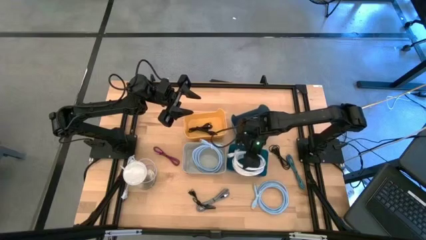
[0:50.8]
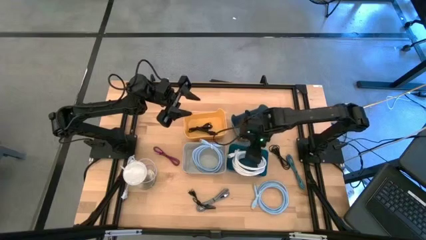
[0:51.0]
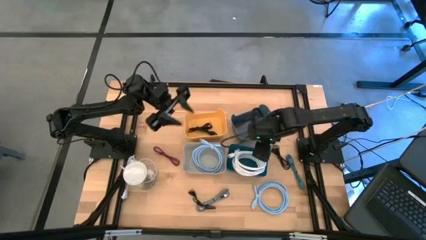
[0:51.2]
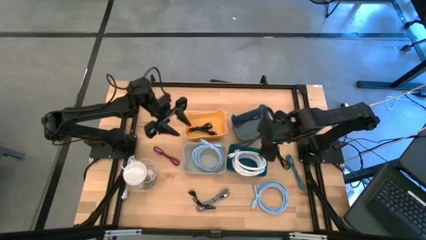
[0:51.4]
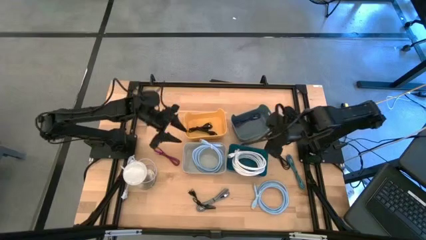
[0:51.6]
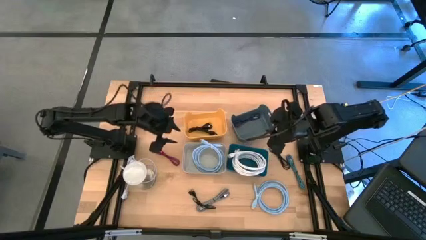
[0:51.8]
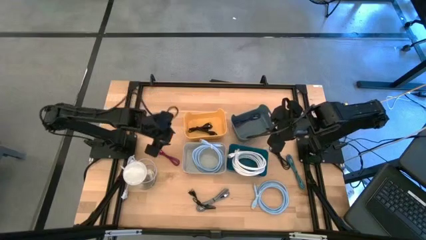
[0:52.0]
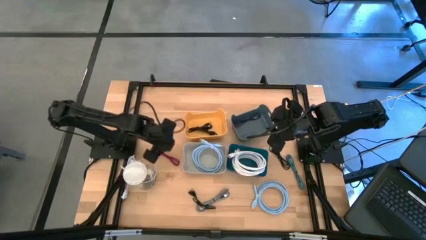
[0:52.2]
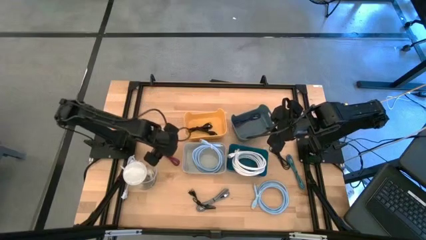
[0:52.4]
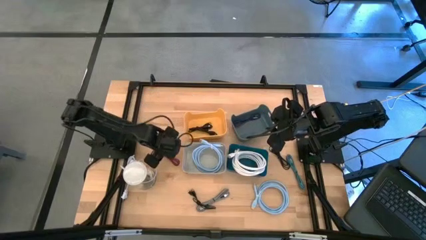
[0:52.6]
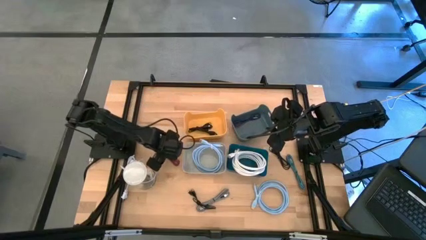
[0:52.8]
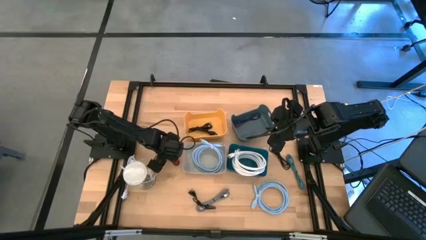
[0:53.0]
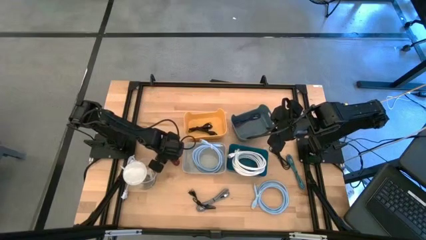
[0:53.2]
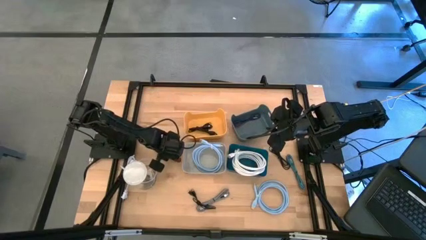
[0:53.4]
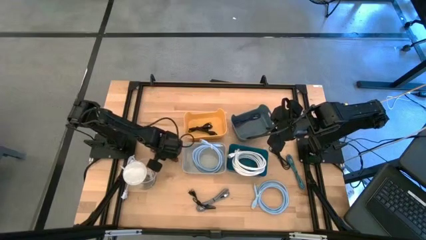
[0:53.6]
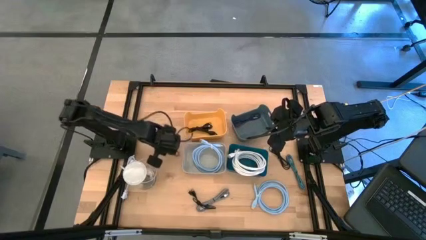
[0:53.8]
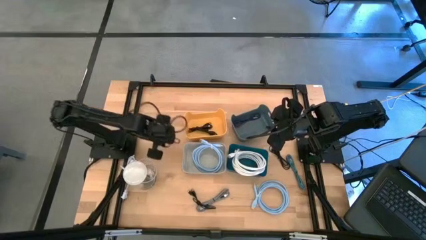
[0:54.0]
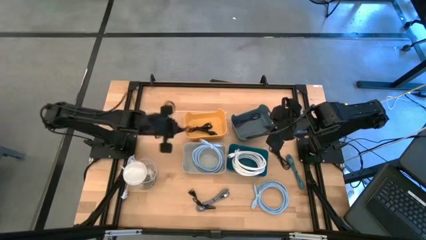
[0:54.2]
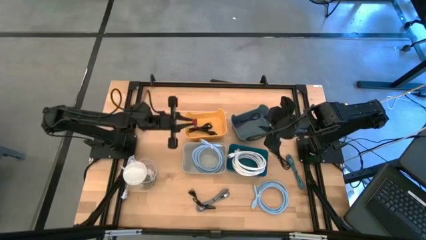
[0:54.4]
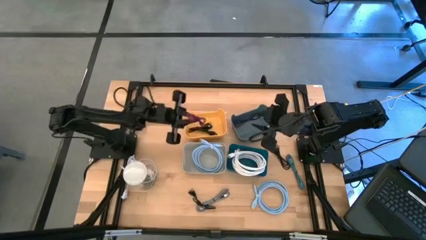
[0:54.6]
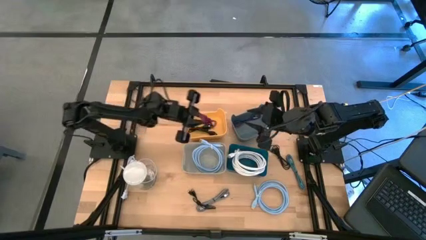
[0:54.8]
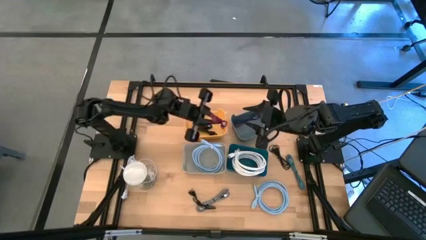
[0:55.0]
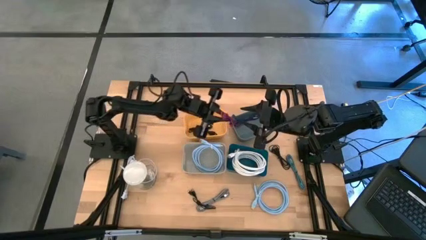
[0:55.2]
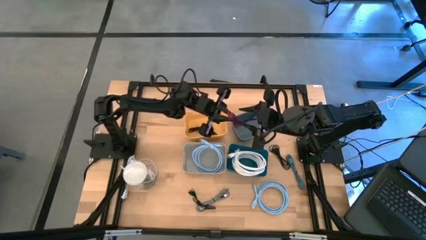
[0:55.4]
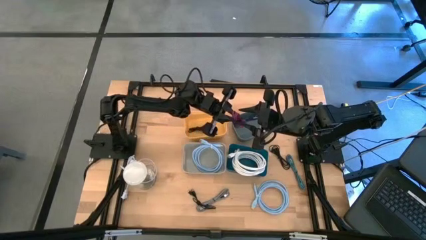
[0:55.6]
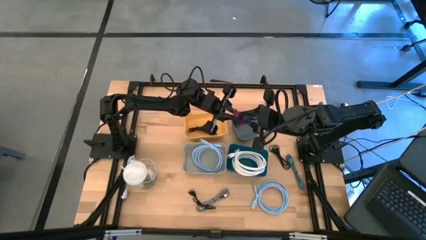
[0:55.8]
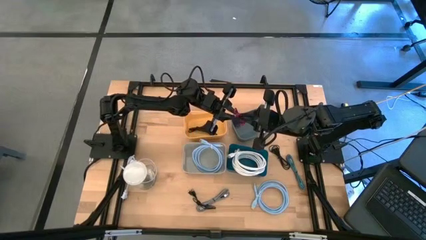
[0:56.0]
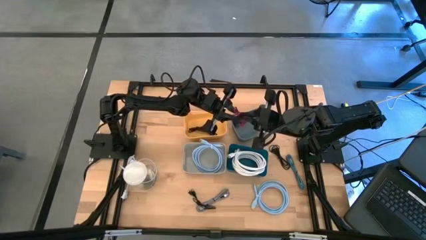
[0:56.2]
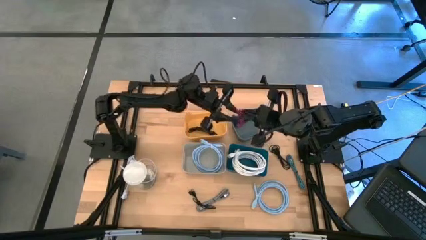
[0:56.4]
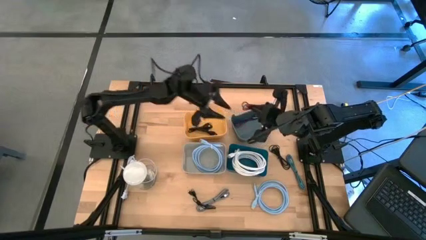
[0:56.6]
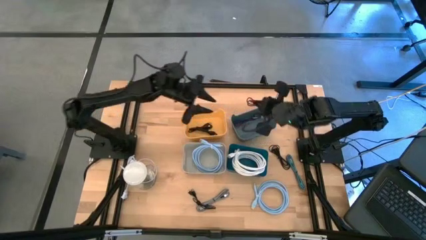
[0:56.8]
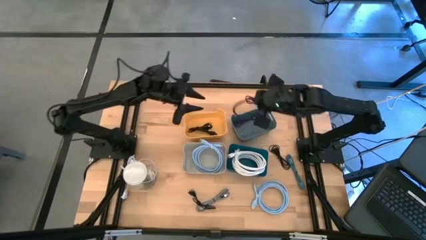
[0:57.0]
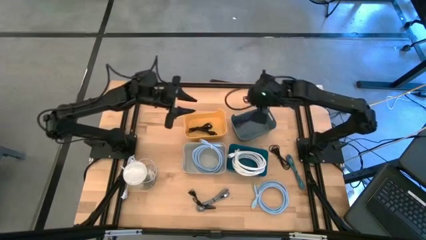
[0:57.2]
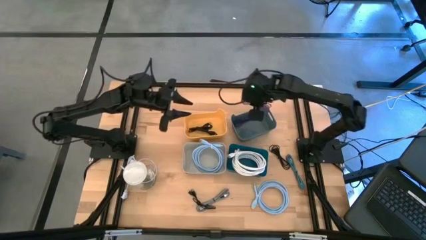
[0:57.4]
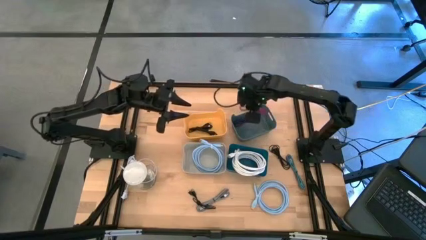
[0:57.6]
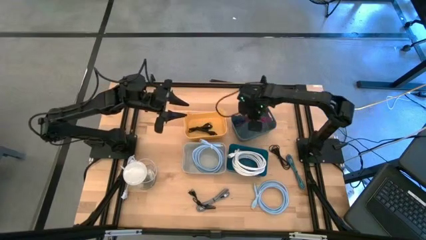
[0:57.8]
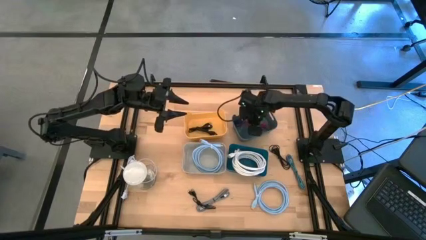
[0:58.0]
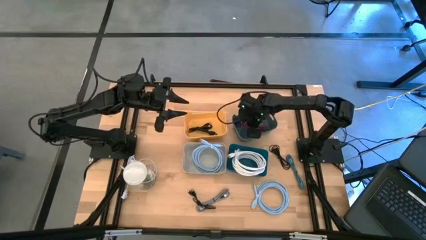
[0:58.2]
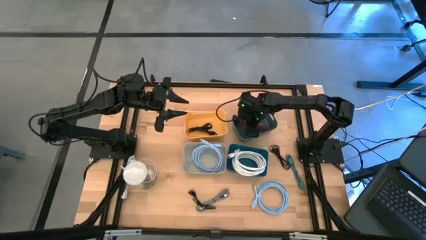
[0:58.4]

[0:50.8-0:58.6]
Task: Pick & Place USB Port
Put the patterned pink USB cable into the green bin

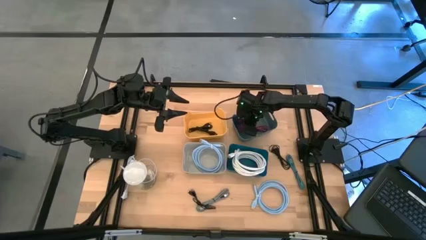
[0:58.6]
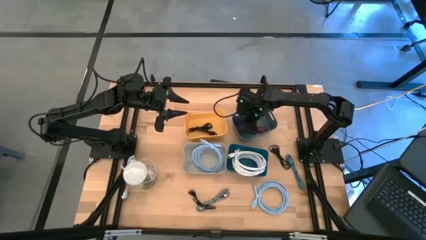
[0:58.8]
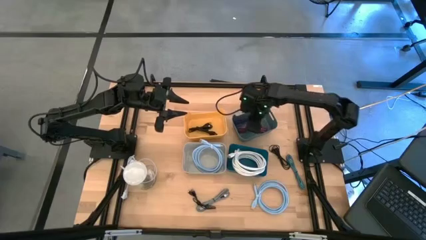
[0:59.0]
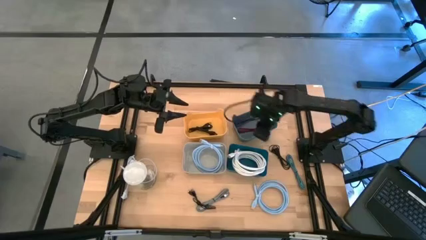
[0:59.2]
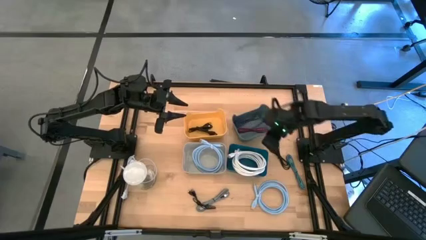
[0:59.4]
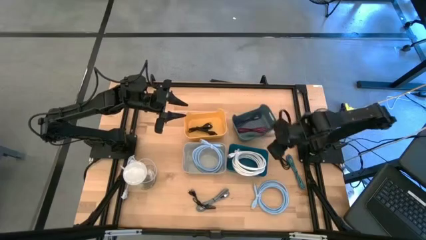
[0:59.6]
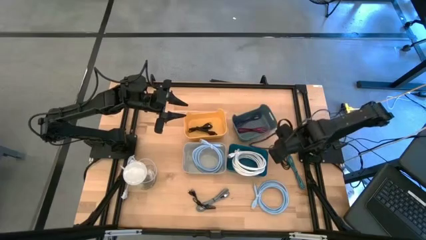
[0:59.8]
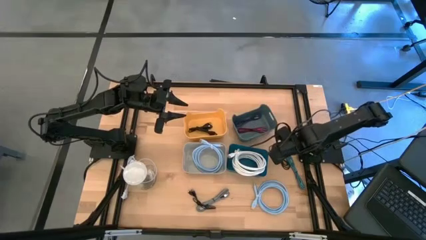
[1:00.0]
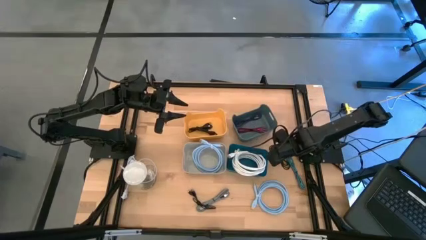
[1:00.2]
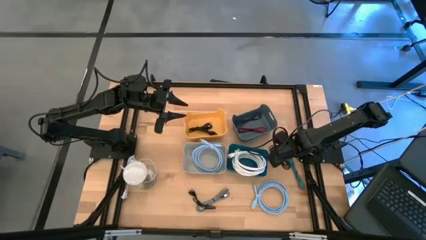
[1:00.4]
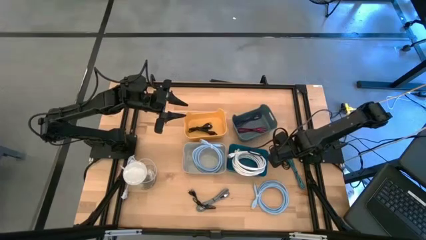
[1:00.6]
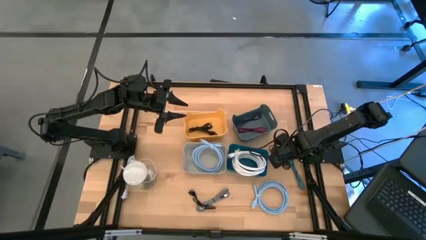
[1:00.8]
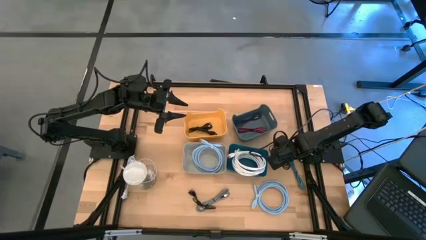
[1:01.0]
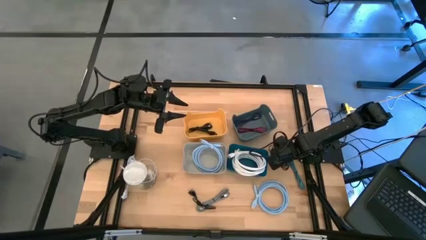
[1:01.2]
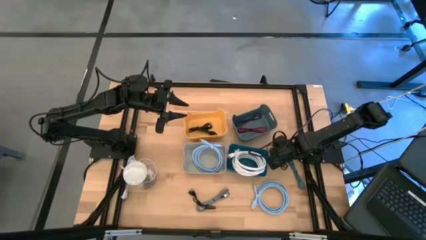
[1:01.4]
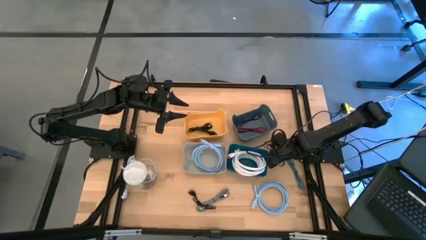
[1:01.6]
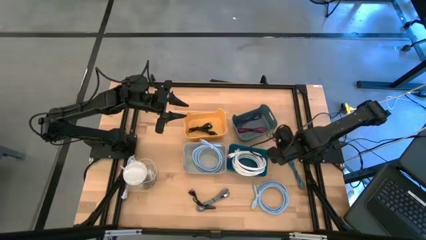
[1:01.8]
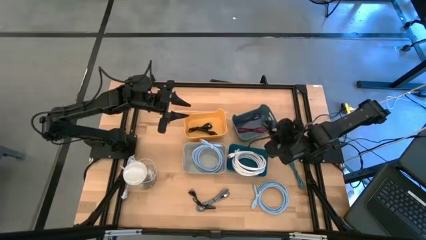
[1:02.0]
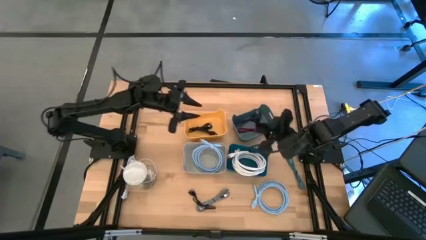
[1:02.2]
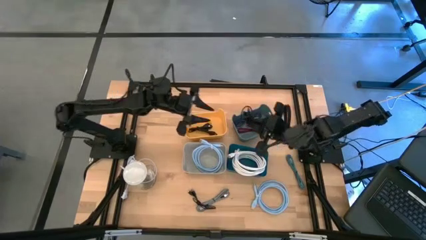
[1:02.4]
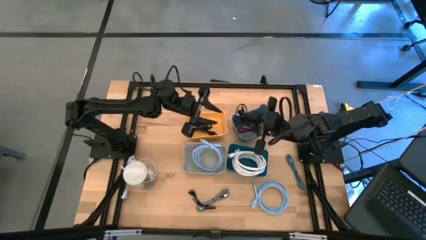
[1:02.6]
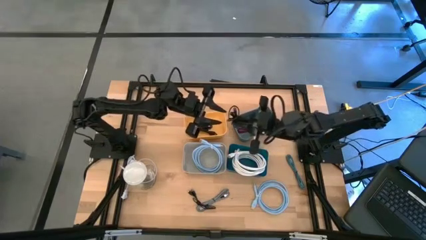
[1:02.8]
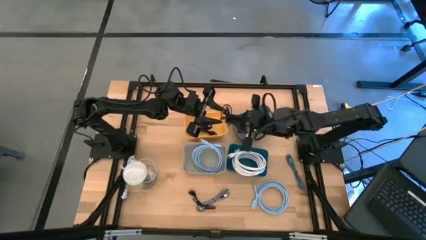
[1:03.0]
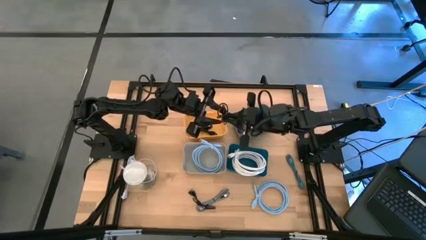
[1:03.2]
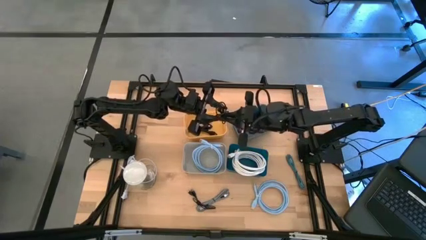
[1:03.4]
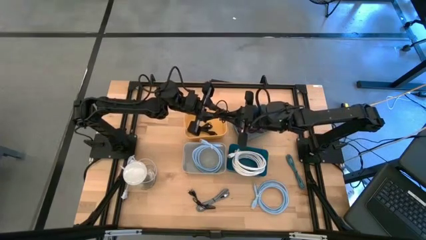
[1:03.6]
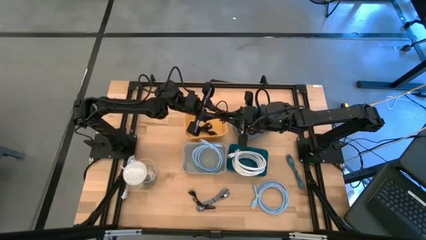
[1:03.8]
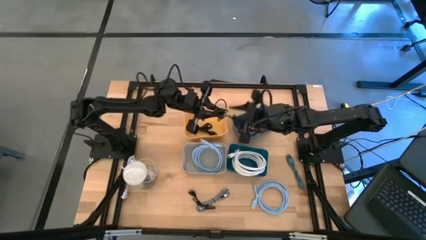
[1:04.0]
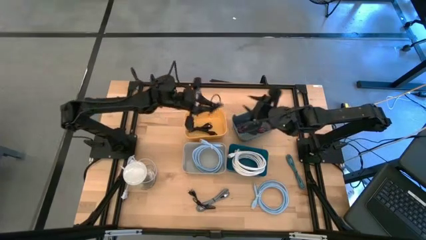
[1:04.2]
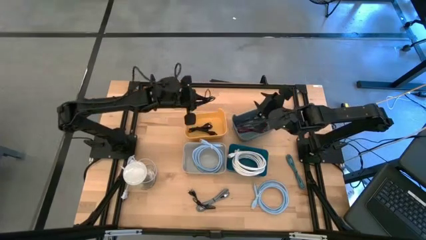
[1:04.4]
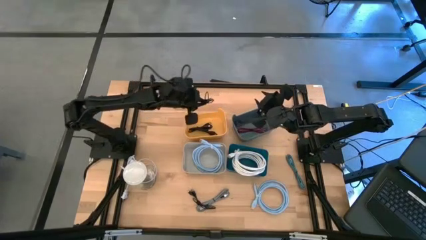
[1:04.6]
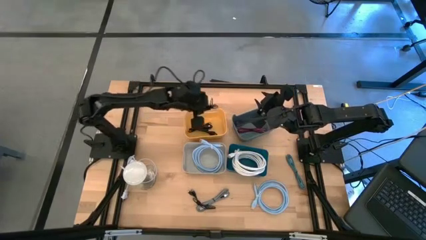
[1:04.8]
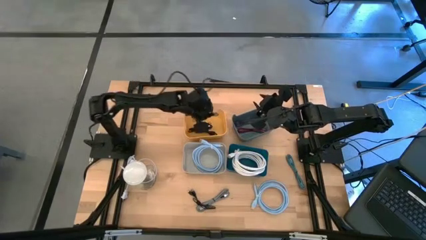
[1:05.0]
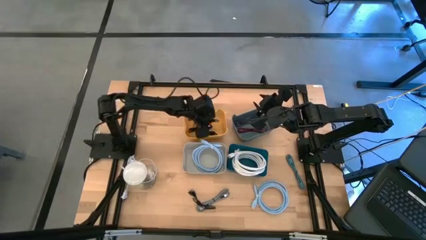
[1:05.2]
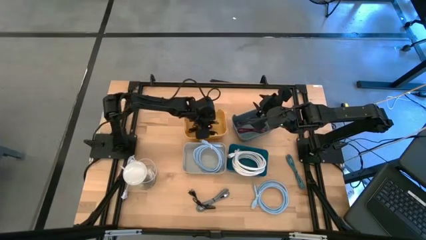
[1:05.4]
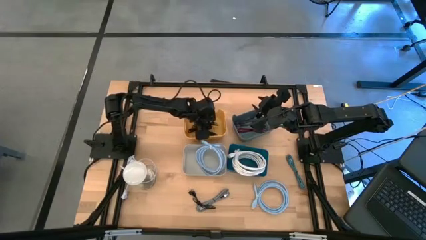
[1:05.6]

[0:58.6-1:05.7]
Put the black USB cable into the yellow bin

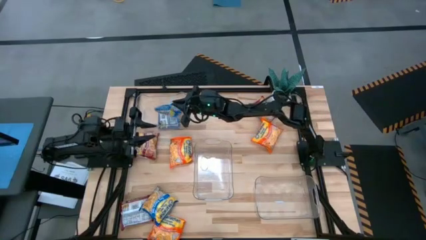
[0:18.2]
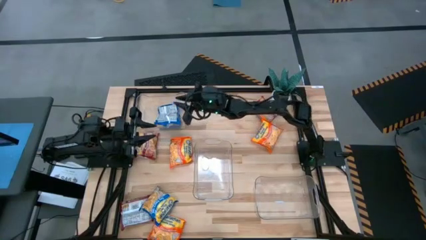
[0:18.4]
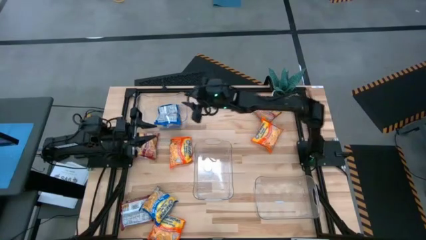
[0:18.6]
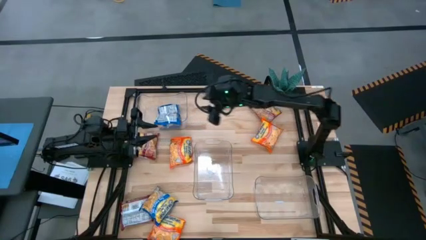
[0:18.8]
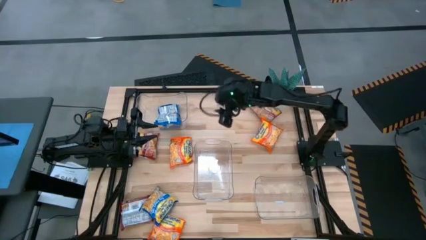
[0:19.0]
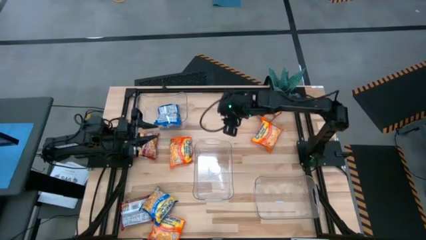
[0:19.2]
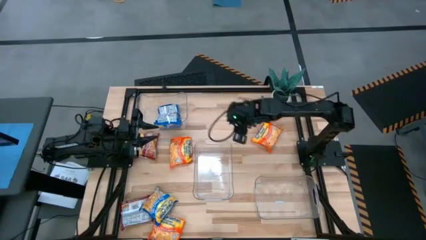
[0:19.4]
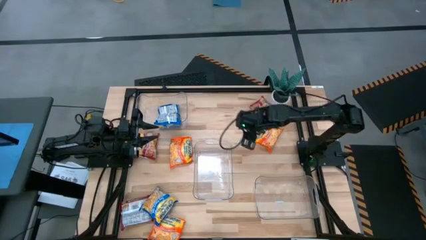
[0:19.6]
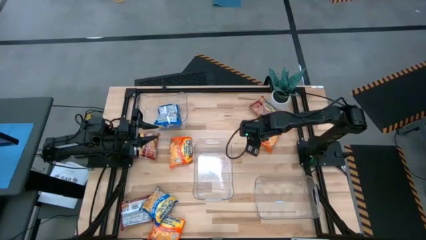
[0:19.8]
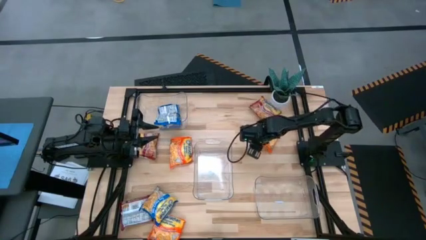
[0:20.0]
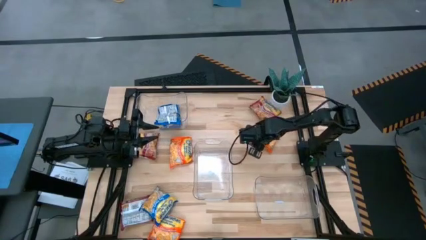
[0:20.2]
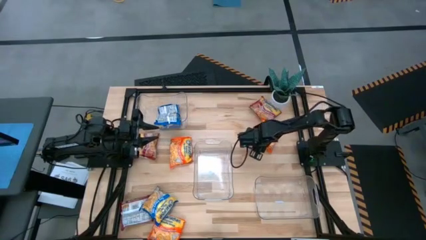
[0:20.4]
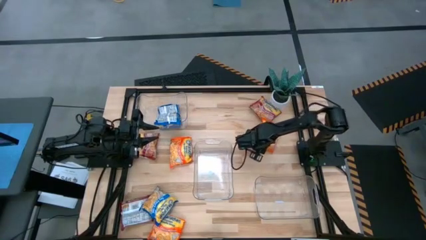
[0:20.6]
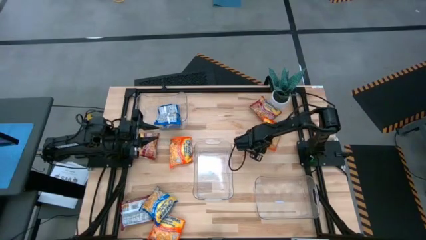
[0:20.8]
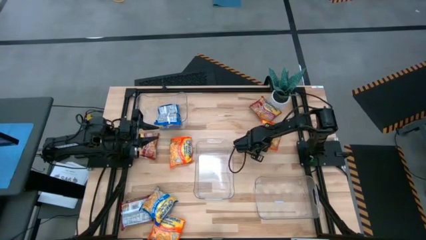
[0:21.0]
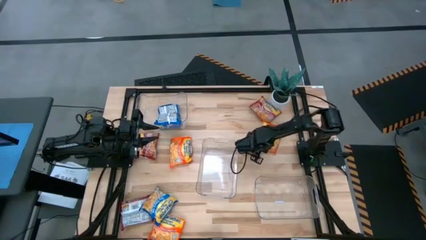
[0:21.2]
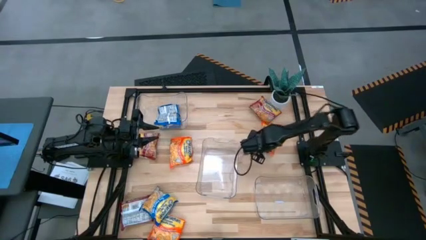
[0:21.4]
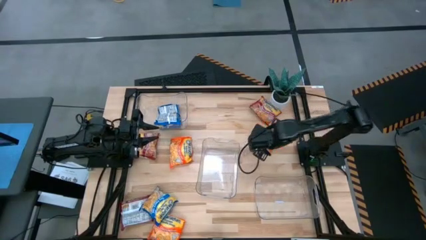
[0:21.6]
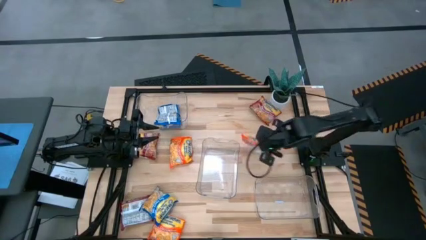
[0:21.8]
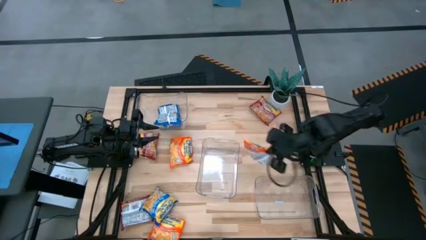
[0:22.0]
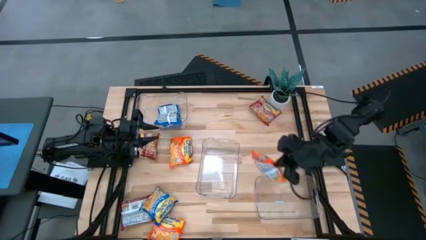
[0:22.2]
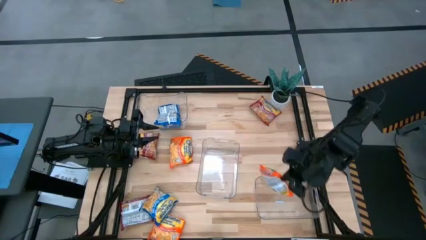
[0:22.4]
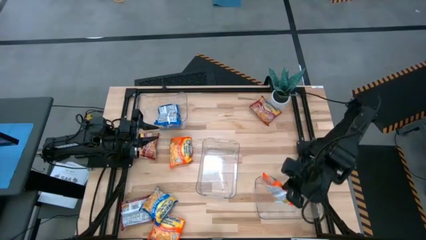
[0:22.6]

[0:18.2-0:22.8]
Task: Sort Maruchan noodles
Put the top right orange noodle pack into the bottom transparent bin
